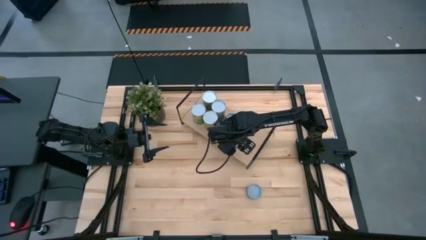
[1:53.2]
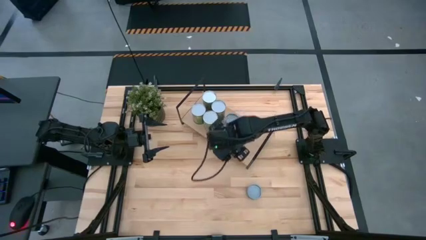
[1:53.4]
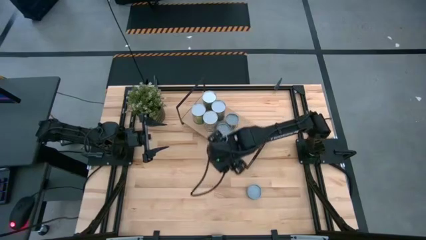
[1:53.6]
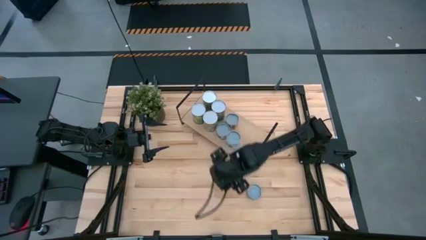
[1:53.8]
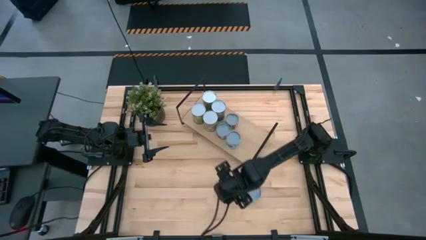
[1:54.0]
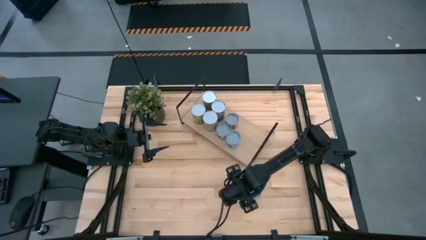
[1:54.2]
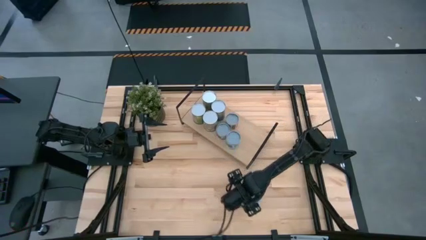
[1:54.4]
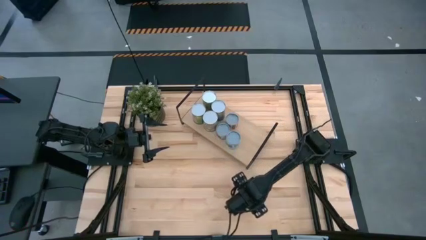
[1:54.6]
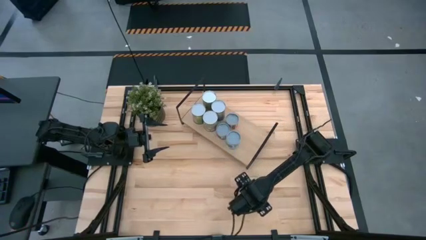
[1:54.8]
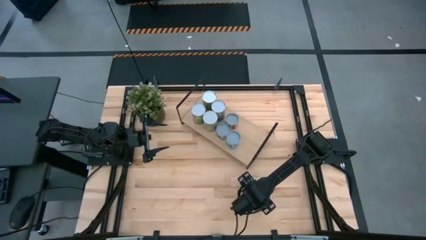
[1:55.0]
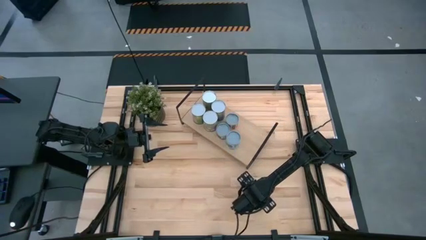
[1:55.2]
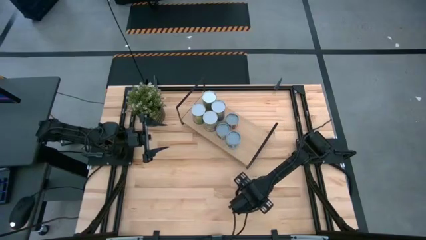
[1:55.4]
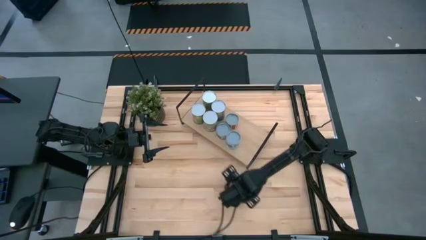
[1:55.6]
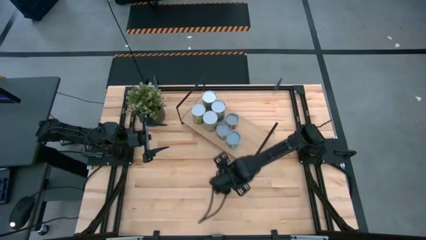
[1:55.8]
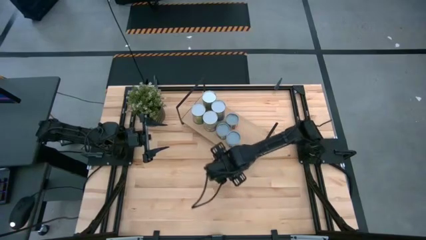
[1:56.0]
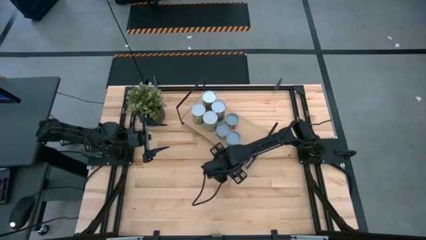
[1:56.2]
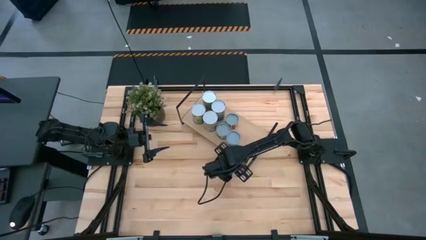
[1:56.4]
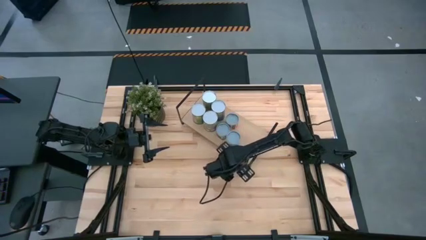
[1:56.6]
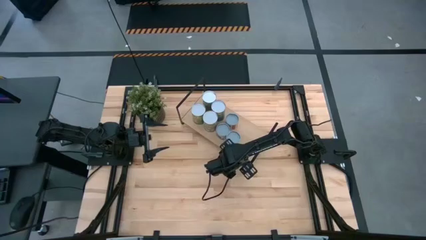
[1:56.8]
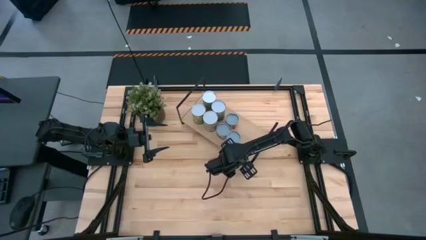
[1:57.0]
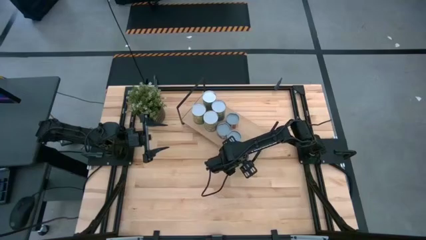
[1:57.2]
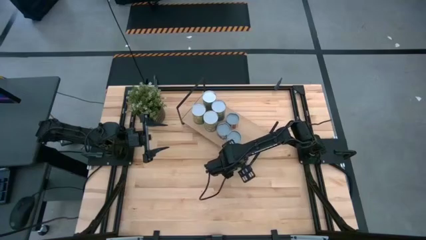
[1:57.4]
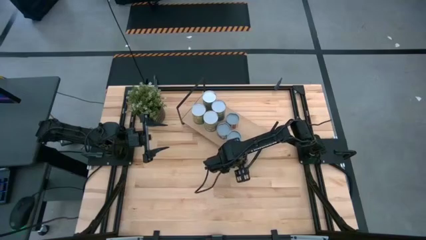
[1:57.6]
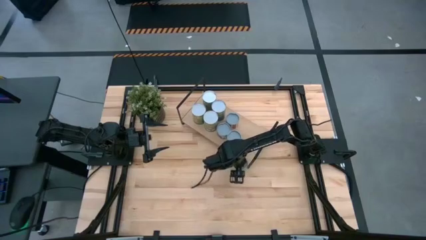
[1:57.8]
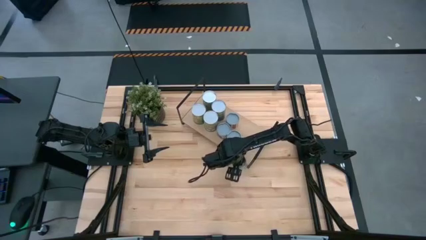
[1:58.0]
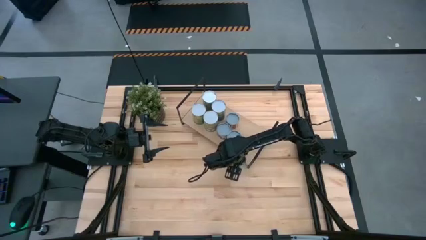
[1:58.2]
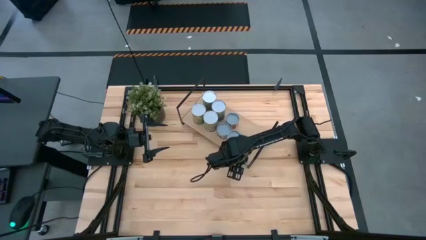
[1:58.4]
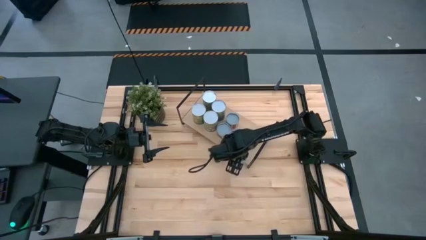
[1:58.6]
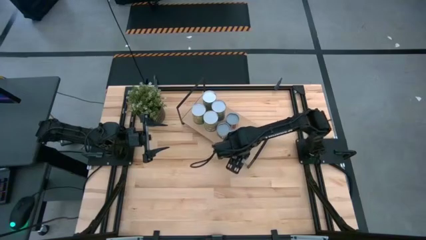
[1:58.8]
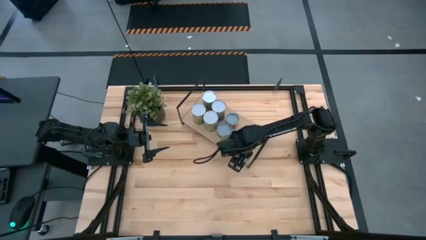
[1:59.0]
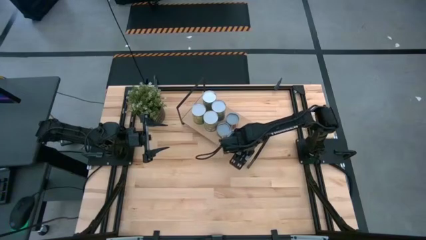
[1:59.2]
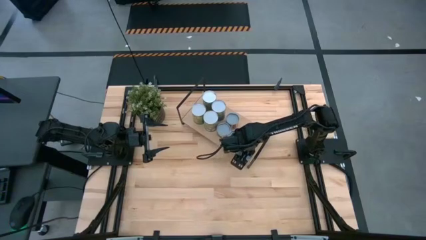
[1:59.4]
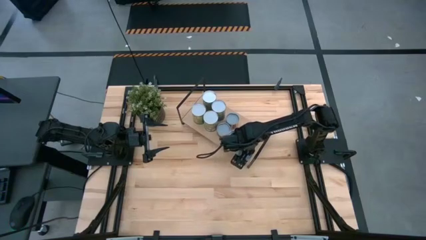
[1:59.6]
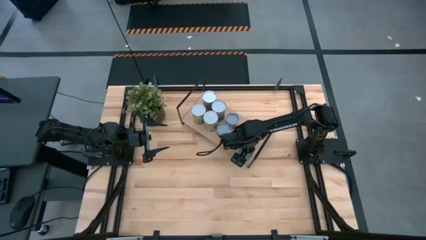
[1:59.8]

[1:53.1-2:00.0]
Task: Pick and place cans onto a shelf
Put the green tuna can on the shelf

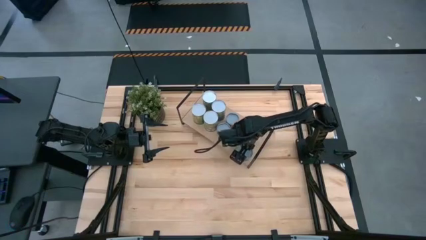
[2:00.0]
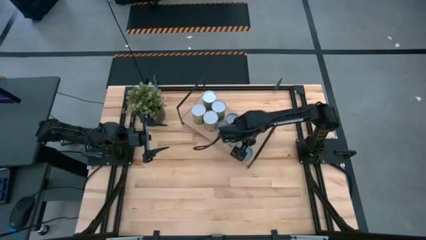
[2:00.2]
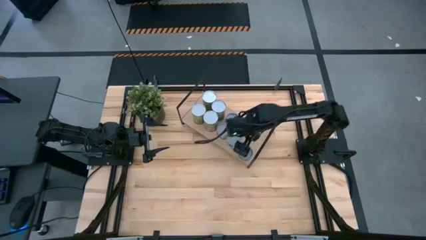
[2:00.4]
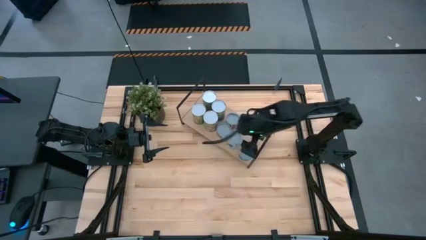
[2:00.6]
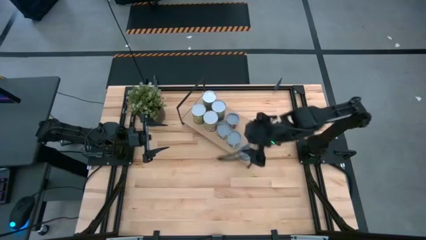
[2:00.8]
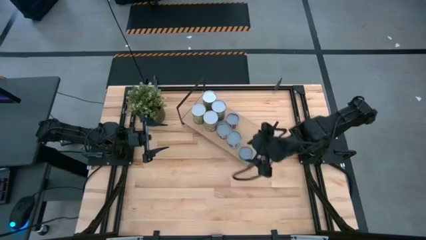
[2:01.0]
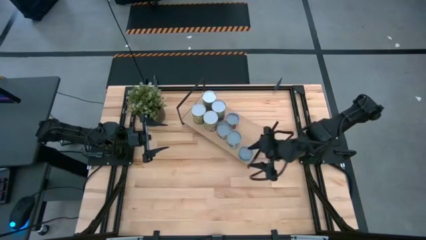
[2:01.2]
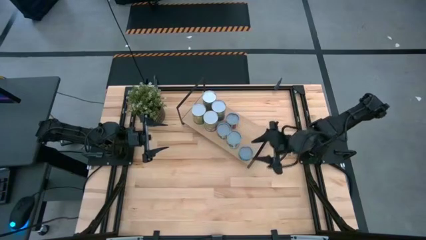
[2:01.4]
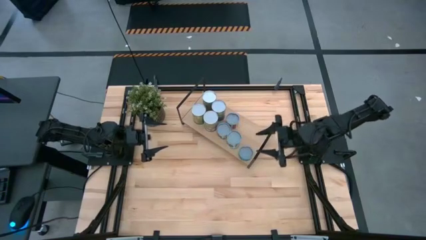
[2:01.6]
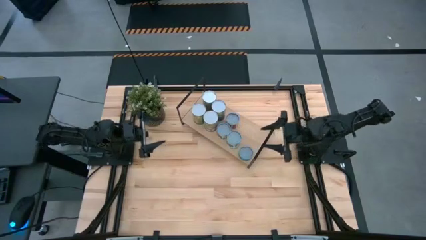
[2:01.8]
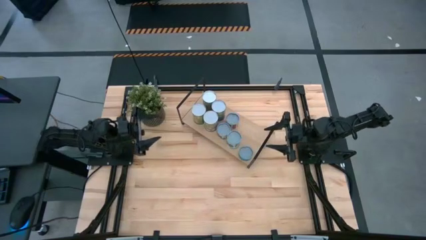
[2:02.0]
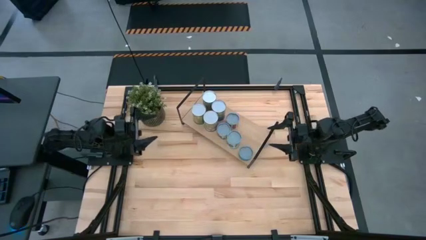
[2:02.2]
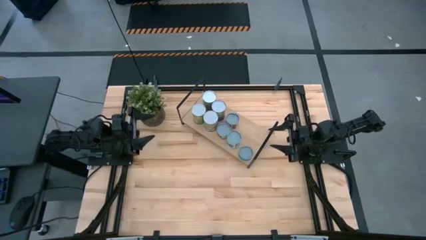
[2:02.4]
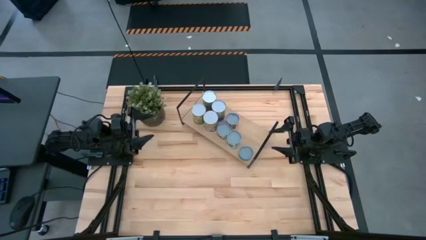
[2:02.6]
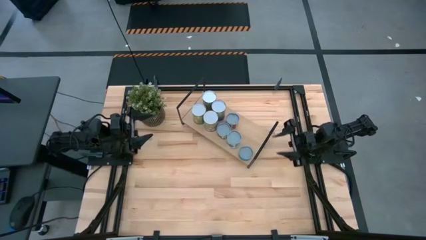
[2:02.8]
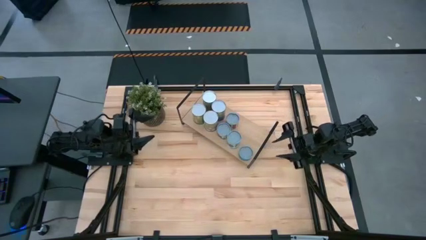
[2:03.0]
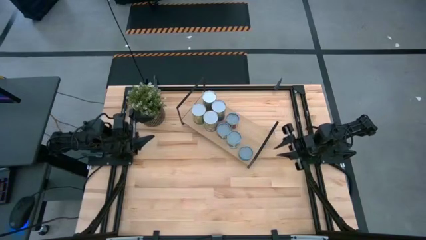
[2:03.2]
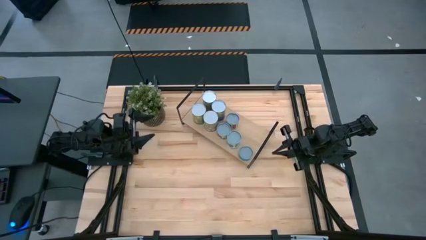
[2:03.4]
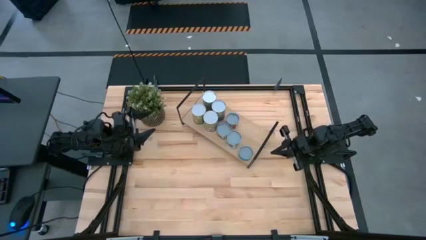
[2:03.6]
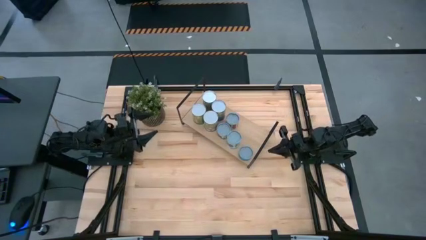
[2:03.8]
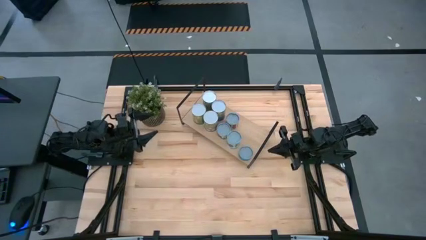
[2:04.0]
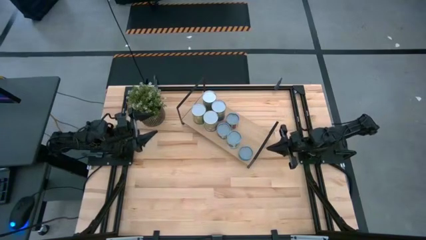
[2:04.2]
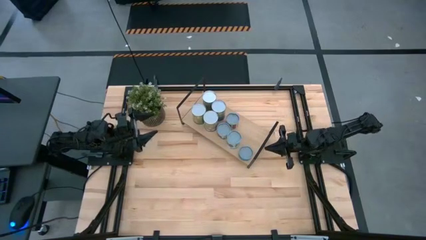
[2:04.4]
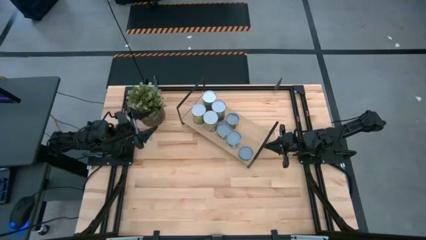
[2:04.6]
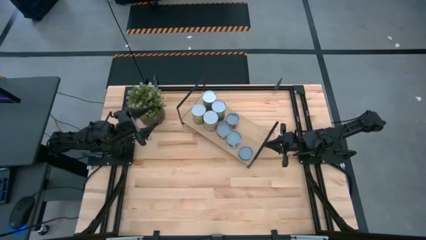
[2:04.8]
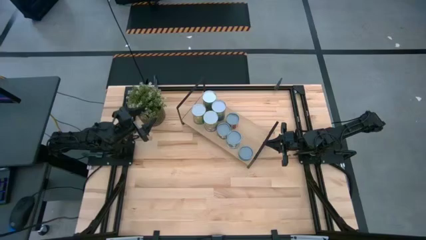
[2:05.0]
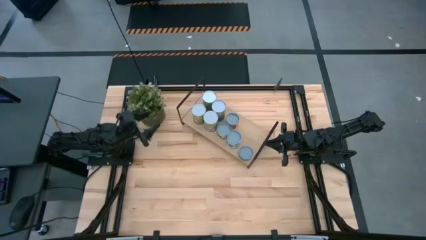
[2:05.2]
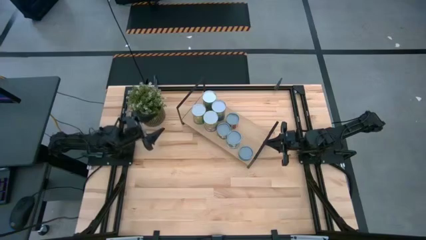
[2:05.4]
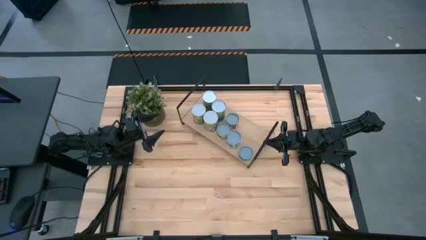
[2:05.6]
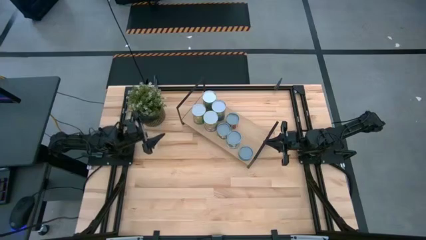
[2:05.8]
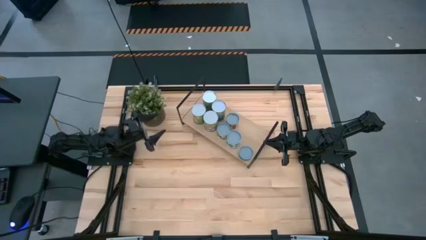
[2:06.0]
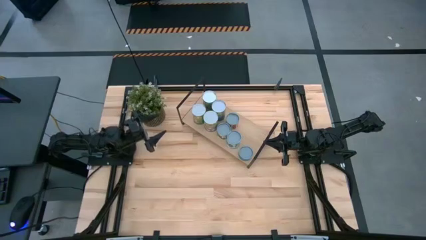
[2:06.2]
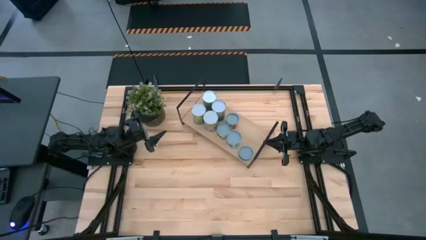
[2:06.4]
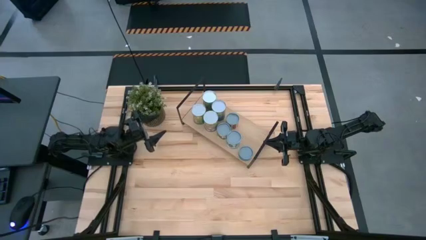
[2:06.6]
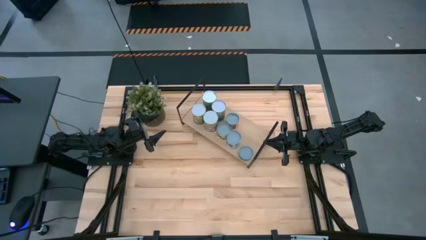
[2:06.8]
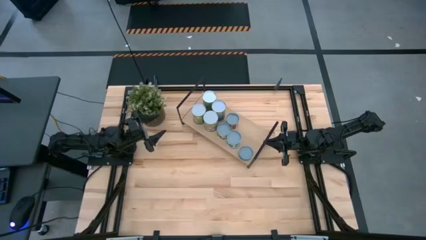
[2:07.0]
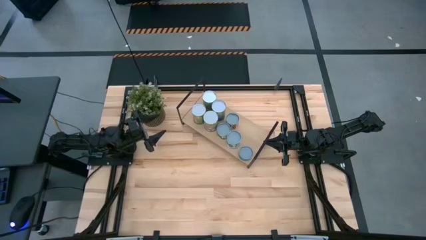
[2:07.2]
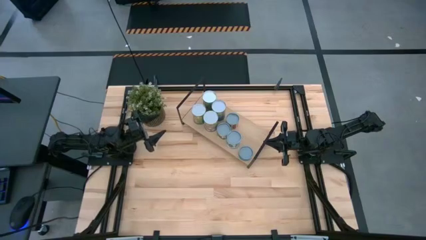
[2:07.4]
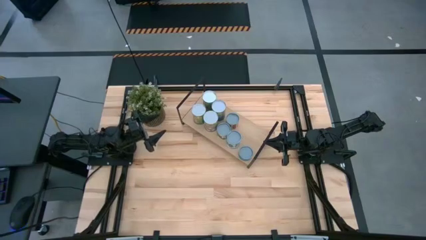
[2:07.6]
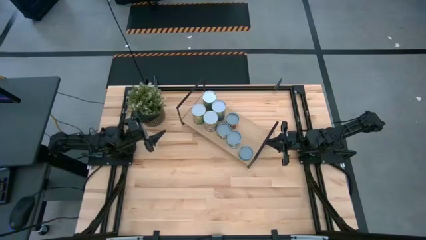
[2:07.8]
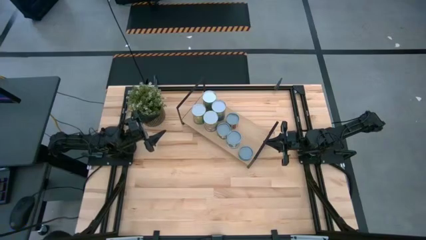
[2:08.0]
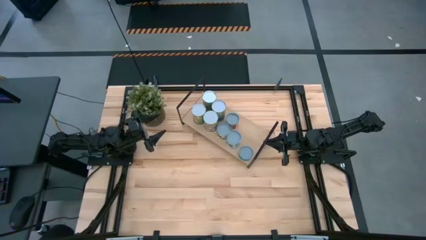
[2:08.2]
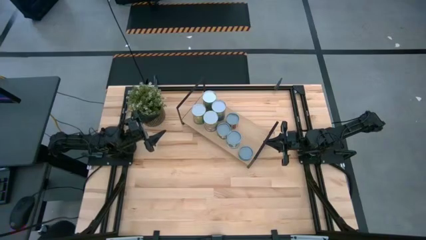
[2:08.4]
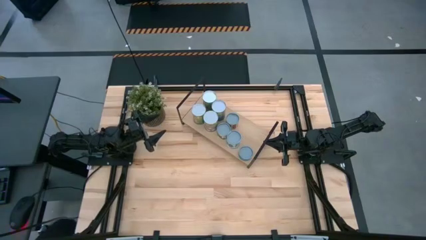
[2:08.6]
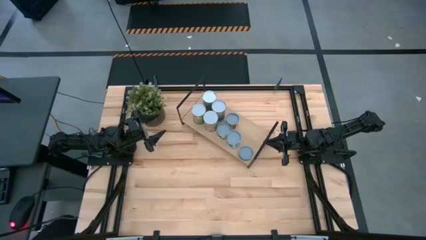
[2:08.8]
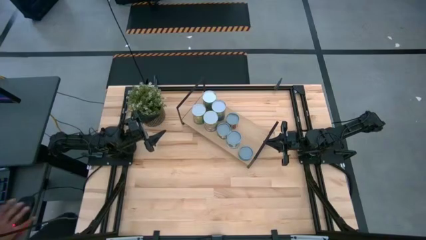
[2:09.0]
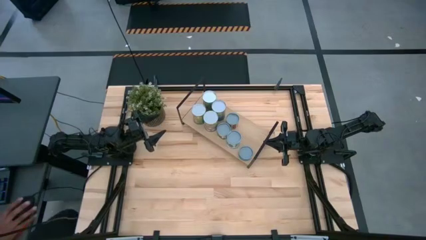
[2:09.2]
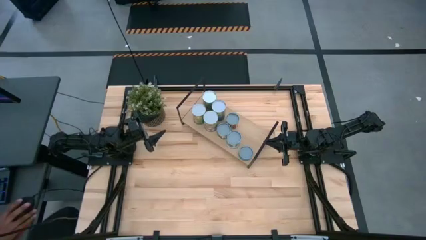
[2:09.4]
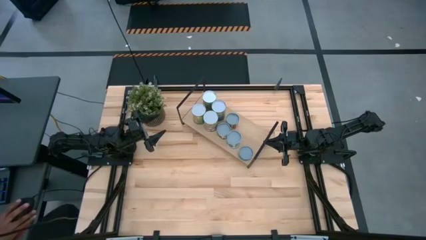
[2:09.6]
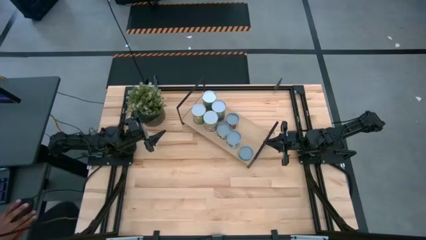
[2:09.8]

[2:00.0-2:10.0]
Return to Home Position

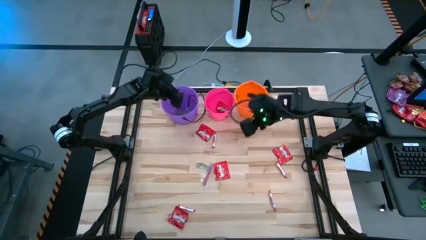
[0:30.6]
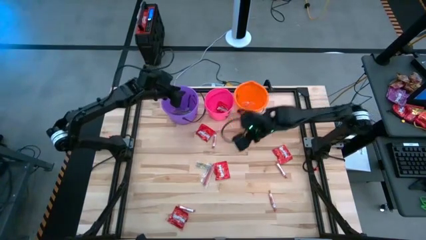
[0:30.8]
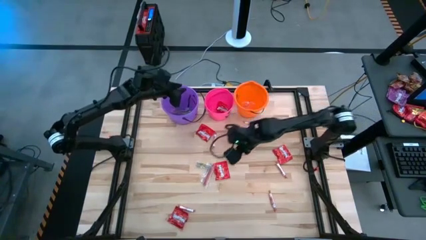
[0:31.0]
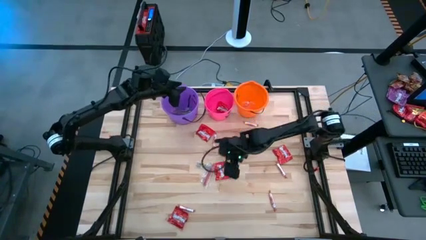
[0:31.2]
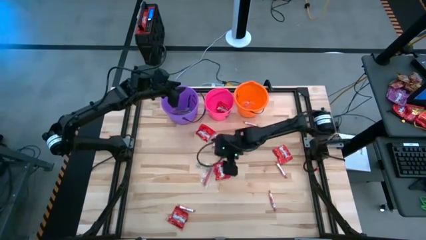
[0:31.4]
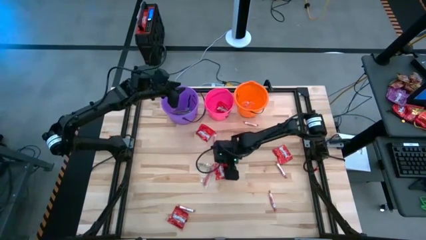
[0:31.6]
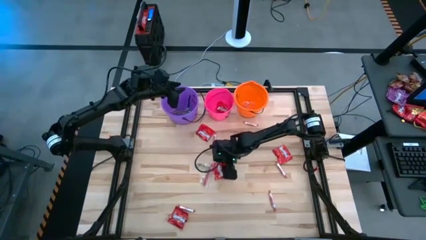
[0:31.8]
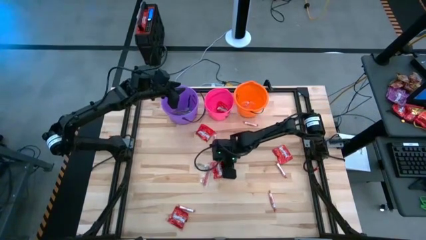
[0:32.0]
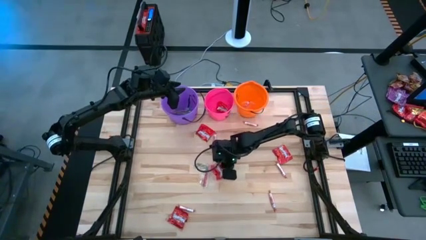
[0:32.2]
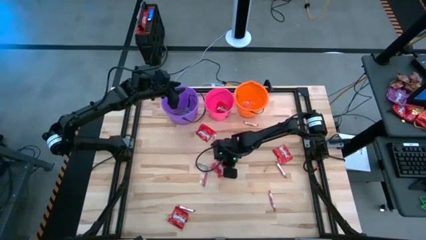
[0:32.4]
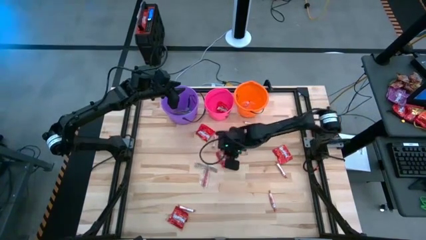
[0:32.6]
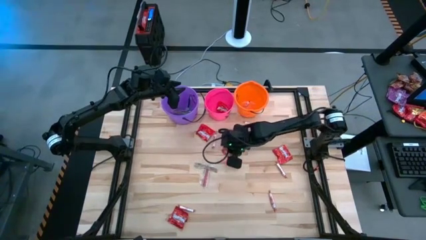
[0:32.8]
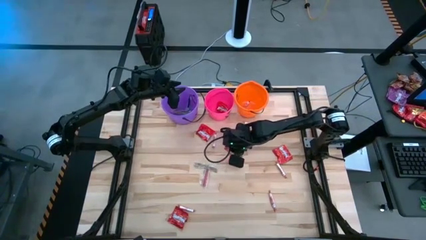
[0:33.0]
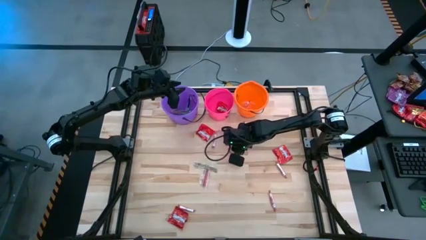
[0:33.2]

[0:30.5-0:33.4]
Task: Sort candy by brand, put in halloween buckets
Put the red candy pack into the pink bucket
